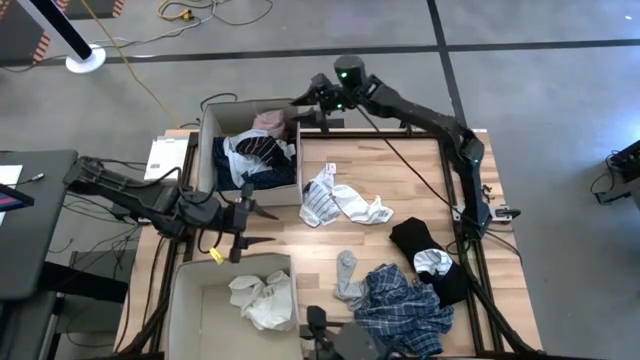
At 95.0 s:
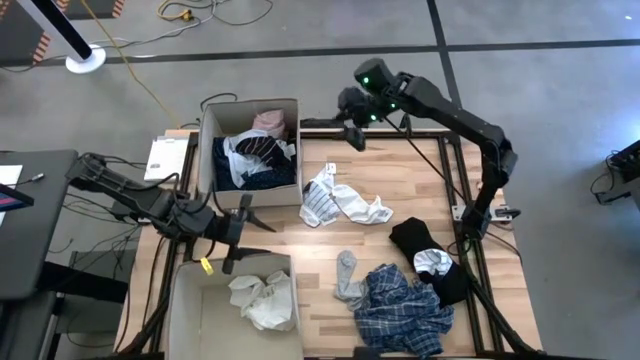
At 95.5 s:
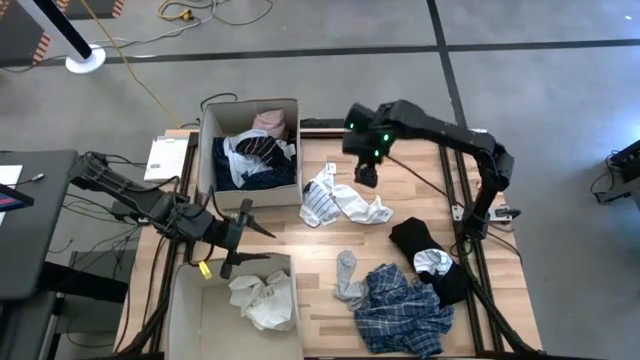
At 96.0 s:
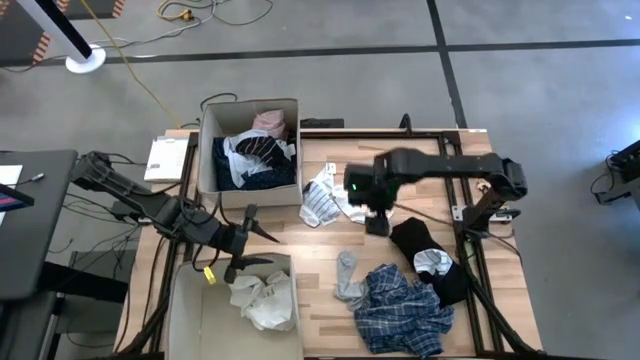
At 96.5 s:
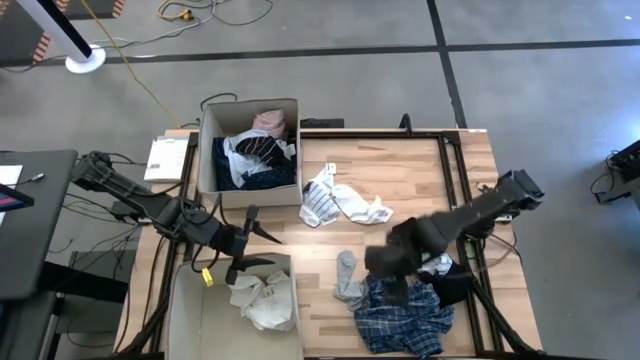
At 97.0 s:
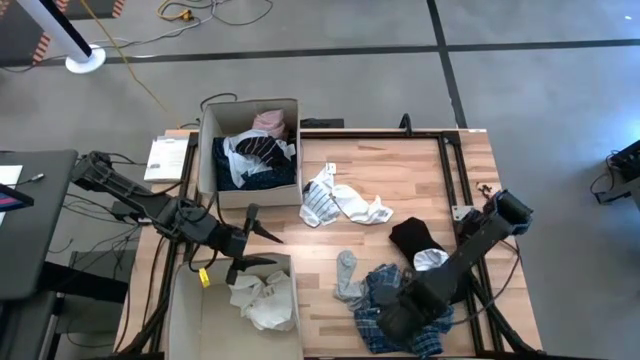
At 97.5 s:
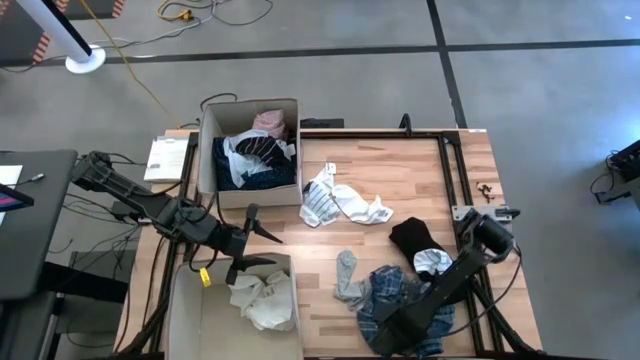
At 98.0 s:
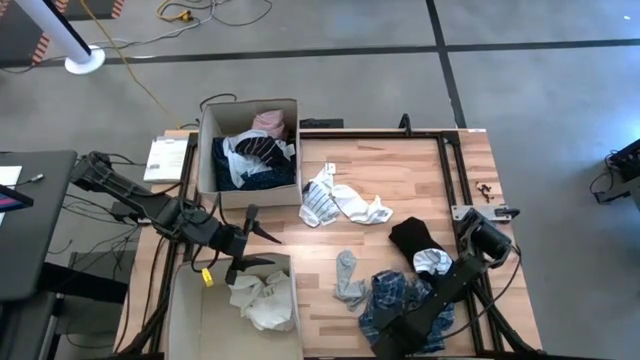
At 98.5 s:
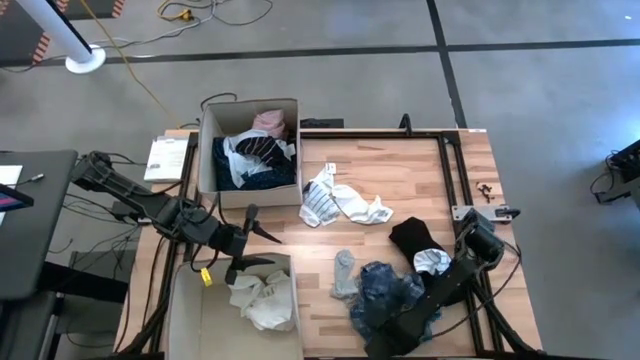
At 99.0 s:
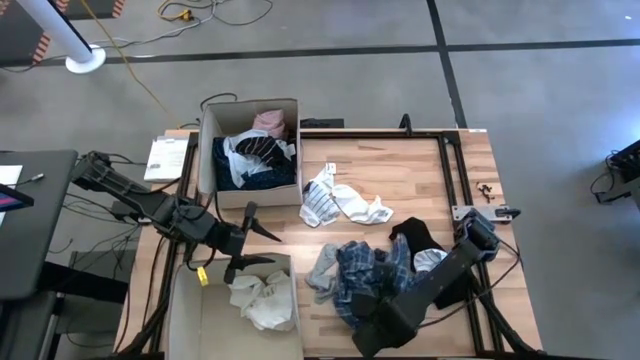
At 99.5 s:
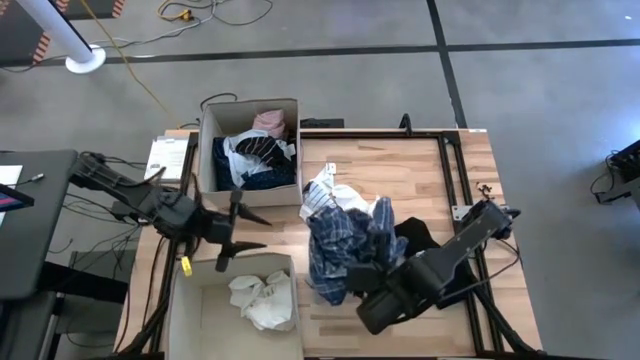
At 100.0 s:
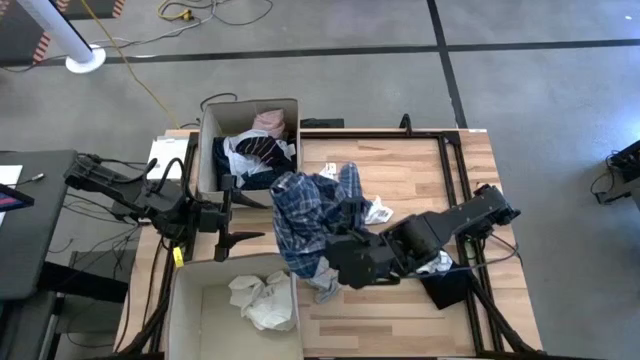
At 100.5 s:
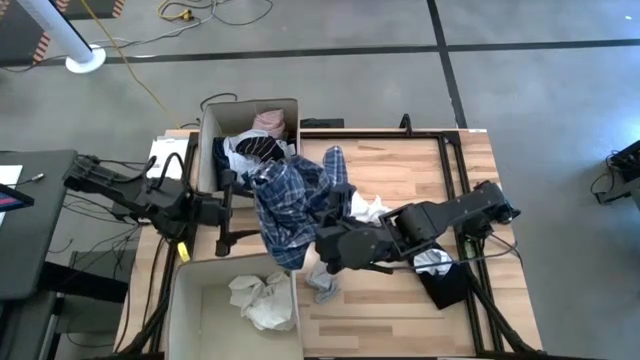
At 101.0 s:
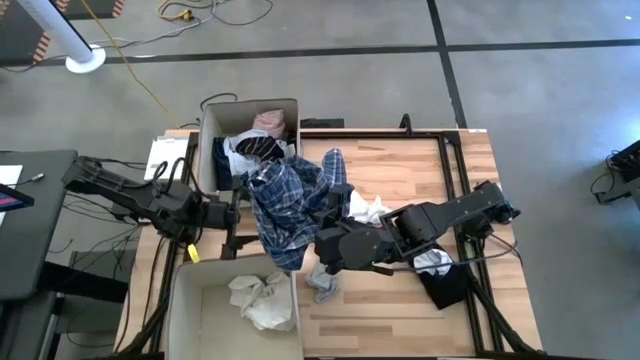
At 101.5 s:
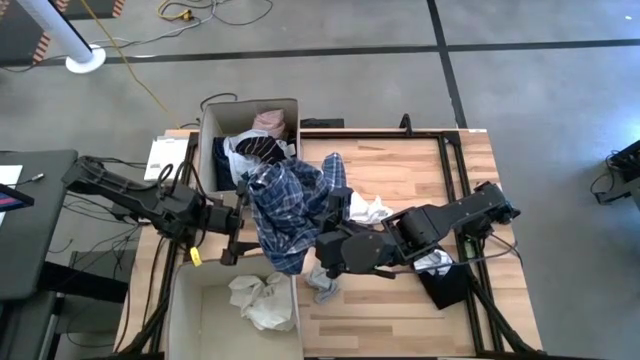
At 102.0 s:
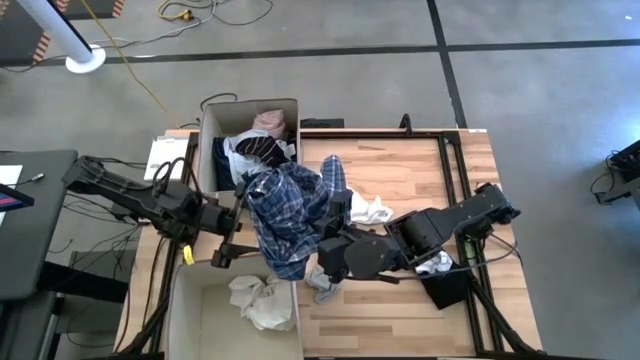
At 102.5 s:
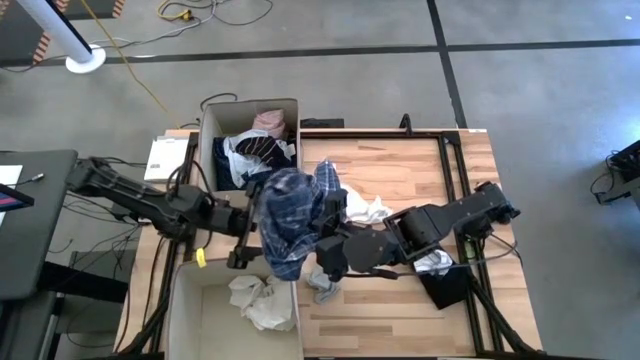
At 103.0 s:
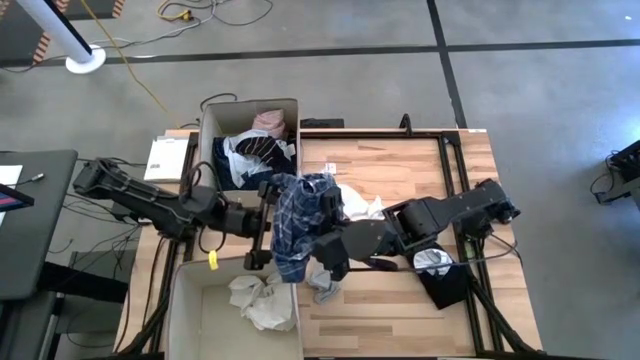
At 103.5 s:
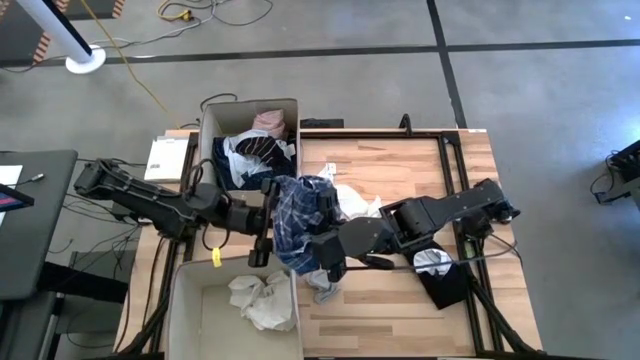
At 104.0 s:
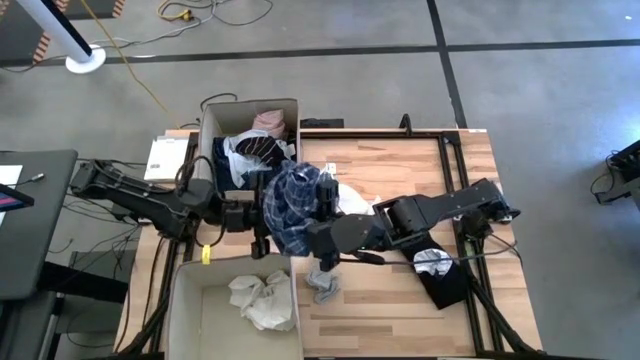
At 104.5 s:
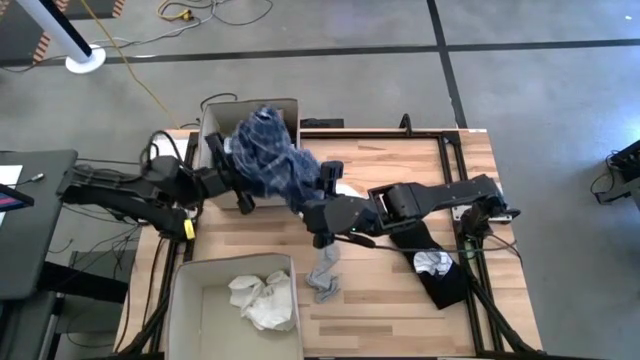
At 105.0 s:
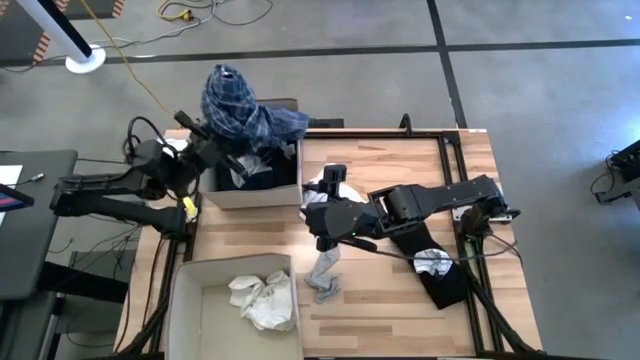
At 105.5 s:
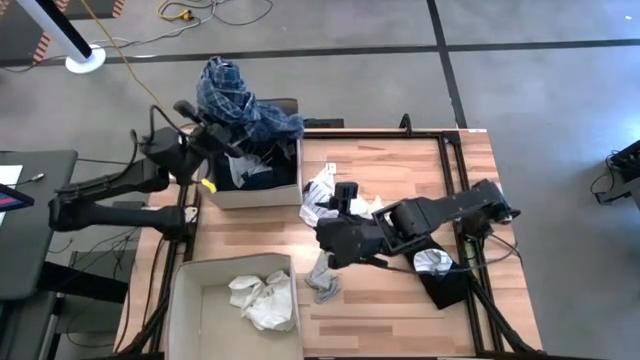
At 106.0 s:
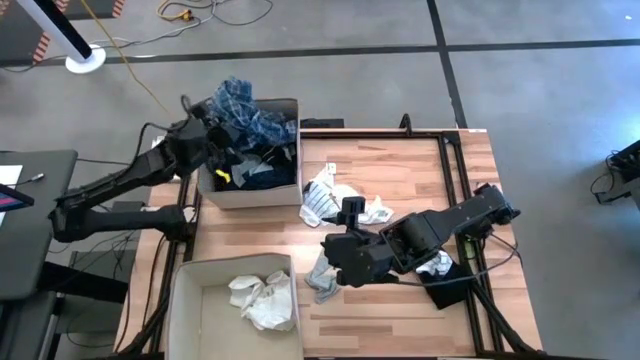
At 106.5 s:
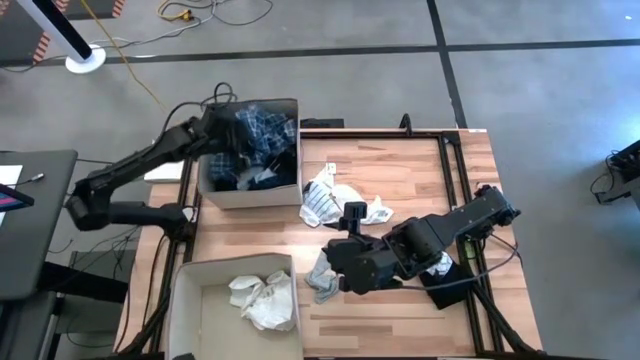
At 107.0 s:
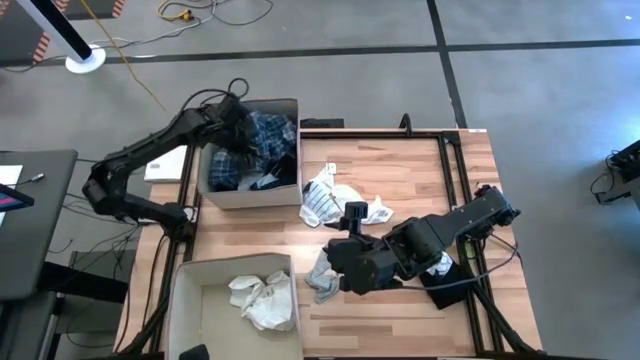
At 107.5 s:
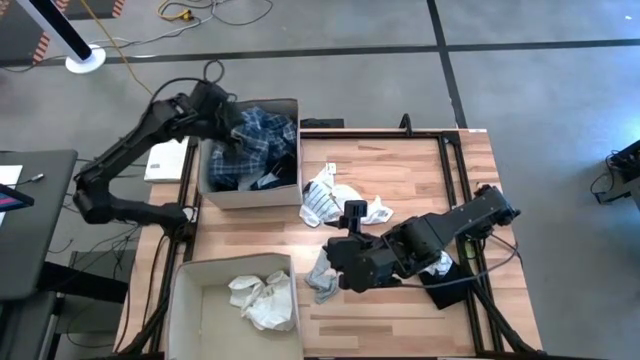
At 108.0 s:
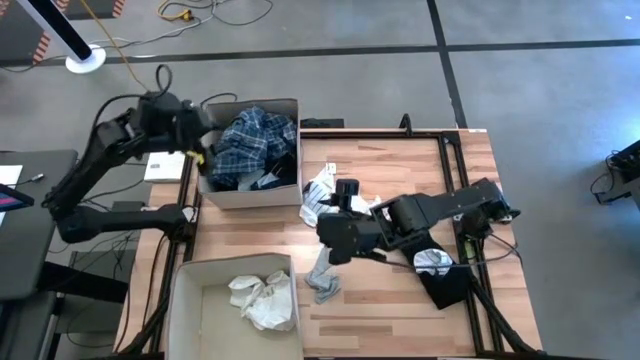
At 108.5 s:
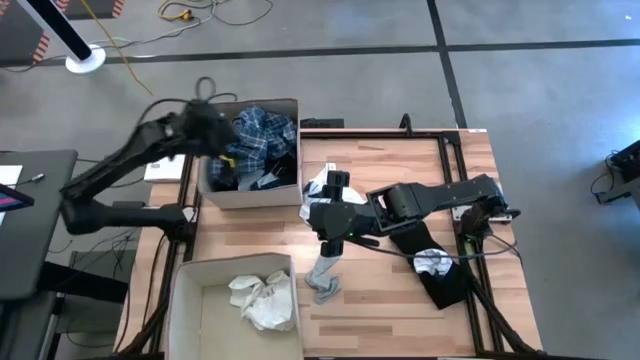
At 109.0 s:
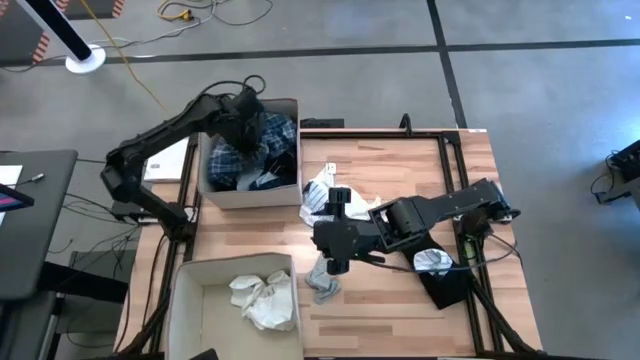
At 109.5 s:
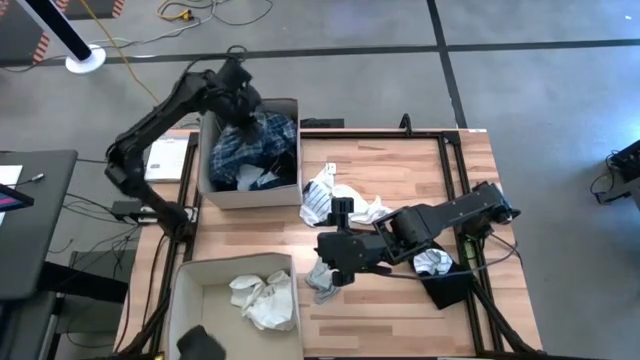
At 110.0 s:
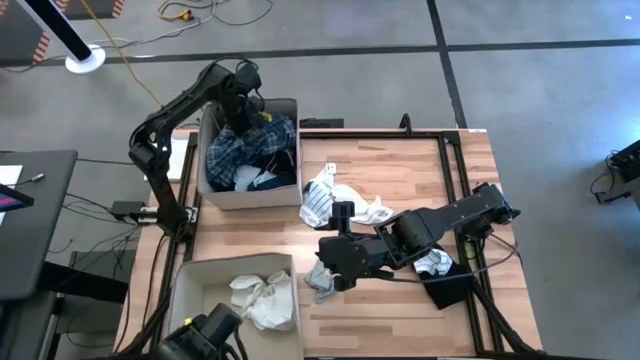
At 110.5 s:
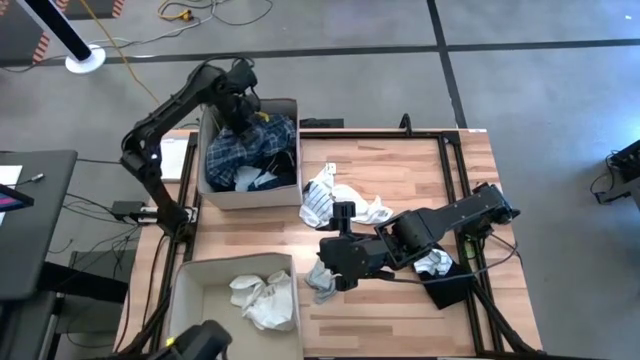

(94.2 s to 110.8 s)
Task: Sort clothes
Put the blue checkered into the top light brown laundry organizer

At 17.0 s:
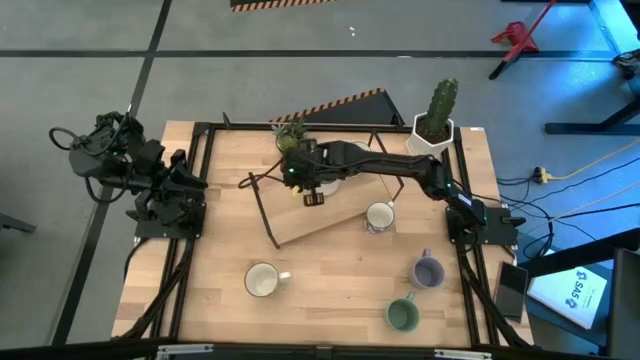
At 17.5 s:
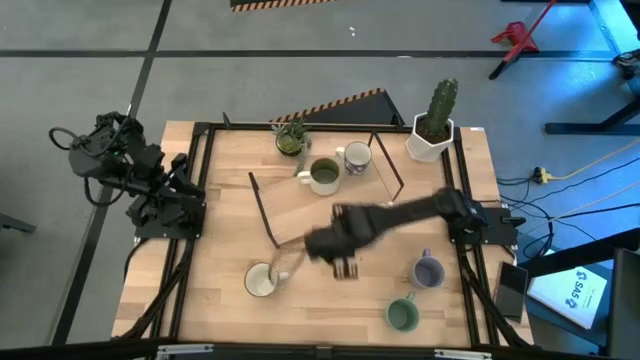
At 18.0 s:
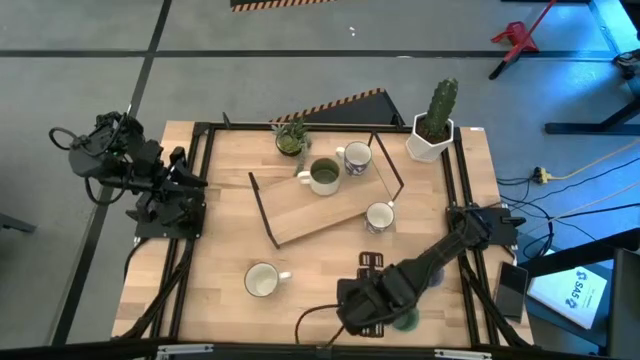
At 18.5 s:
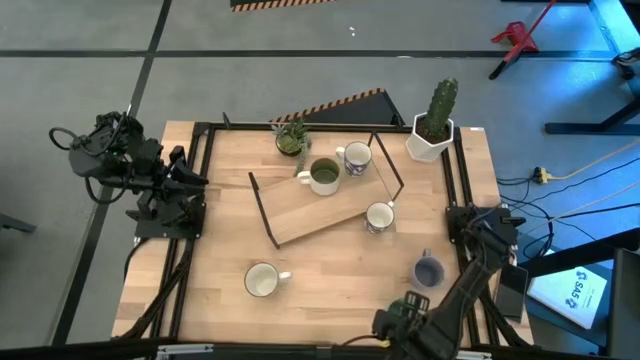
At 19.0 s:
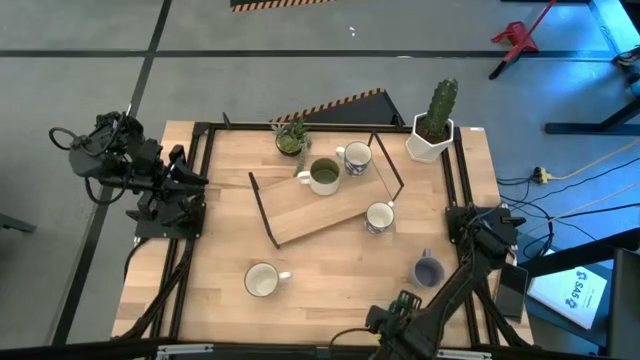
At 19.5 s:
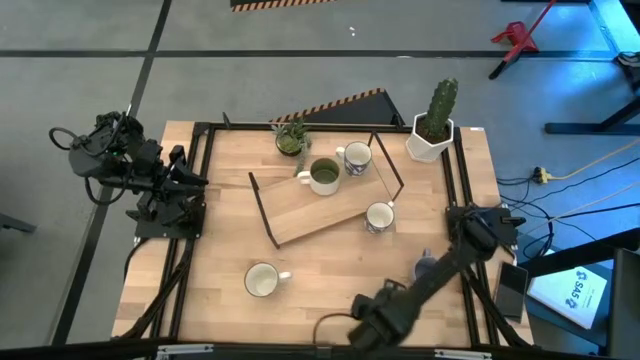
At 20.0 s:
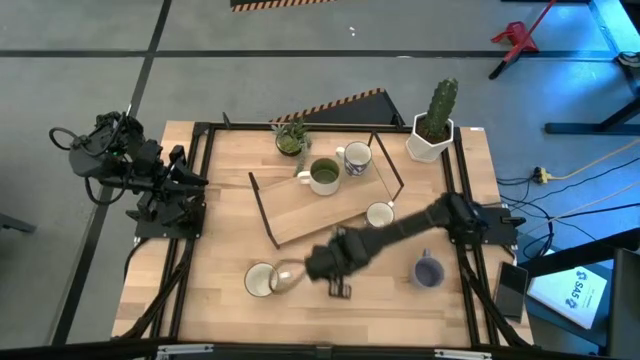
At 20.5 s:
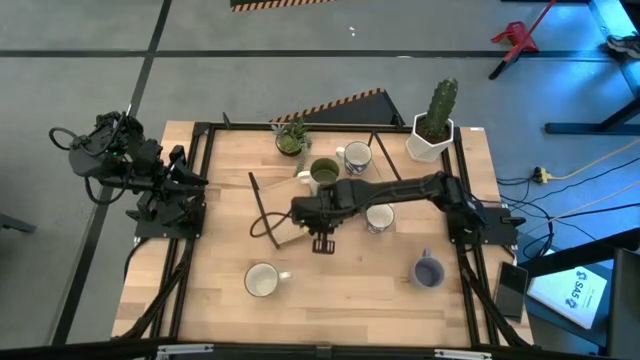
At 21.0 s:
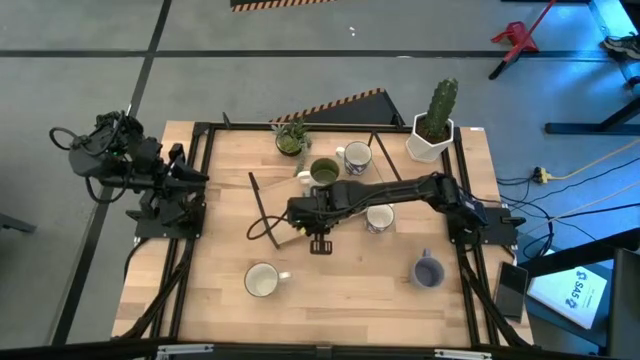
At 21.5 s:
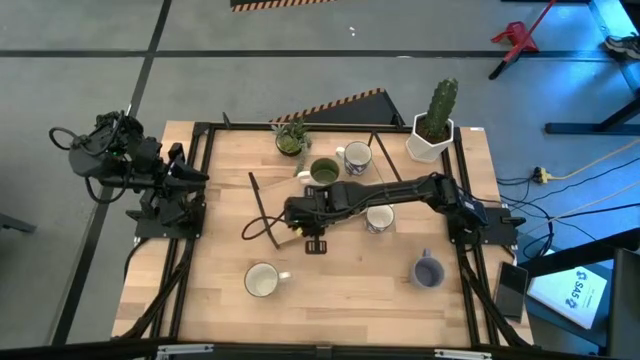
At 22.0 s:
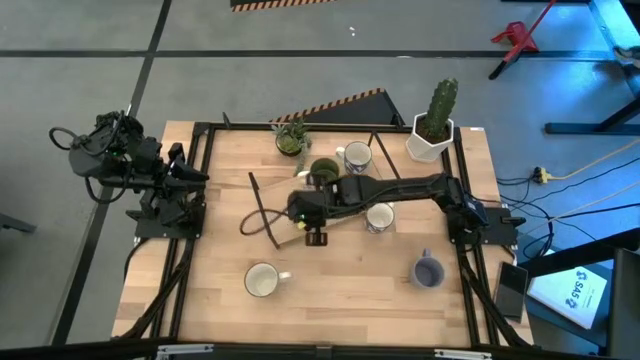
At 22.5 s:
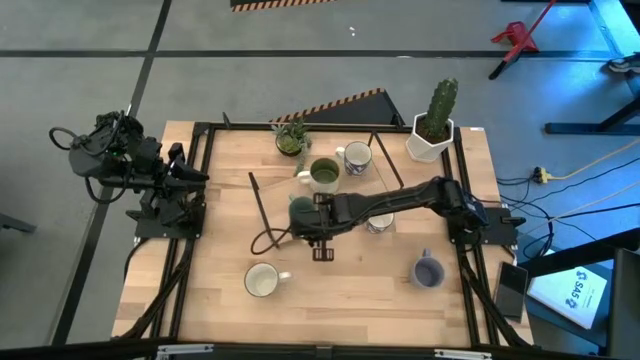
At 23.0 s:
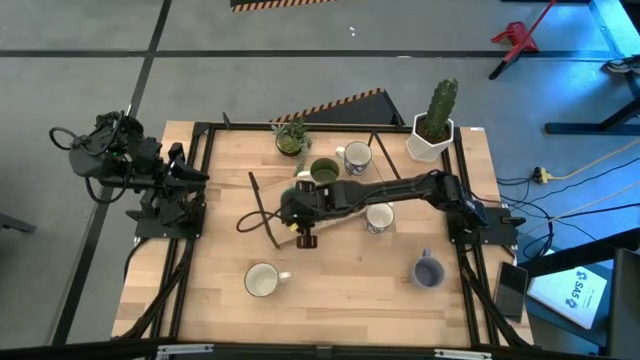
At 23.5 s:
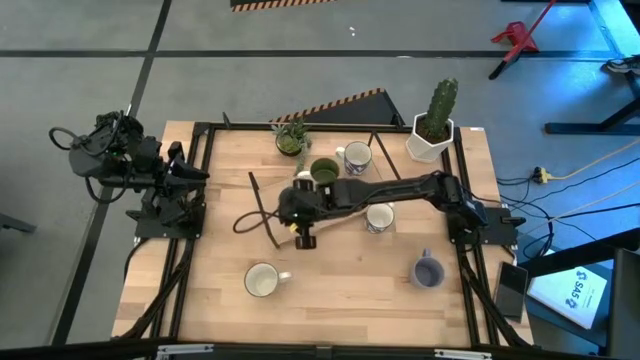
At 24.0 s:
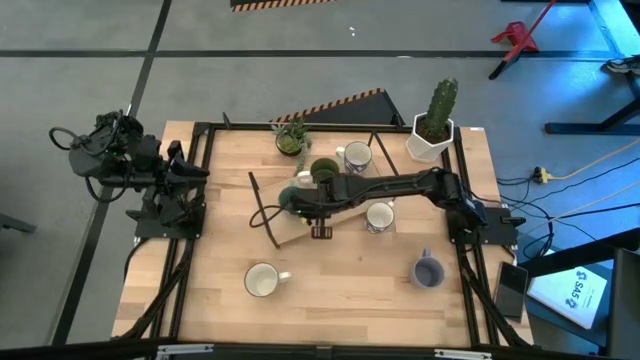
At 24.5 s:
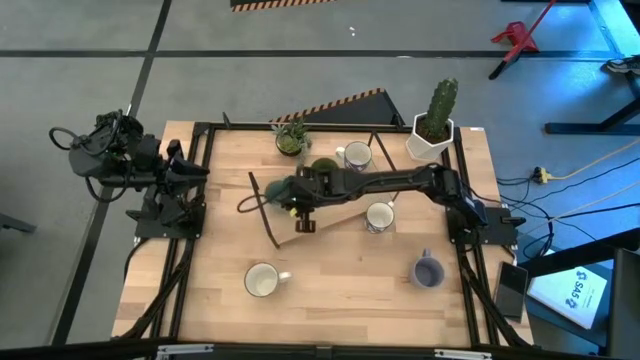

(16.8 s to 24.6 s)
Task: Place coffee mugs
Put the light green mug on the shelf
